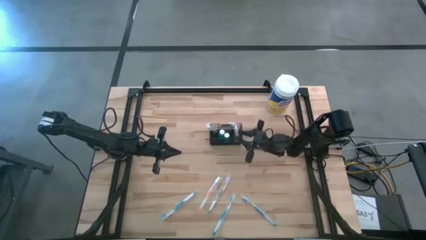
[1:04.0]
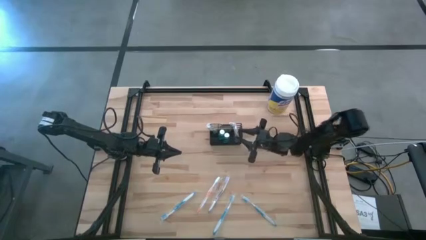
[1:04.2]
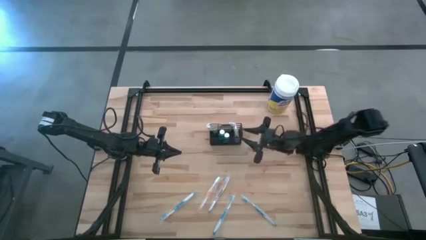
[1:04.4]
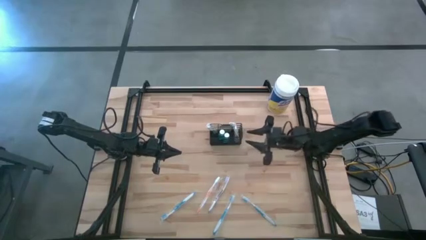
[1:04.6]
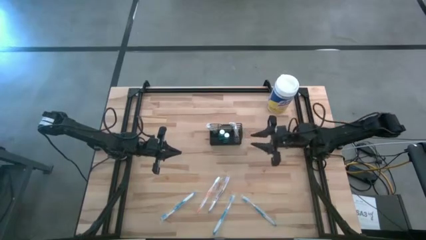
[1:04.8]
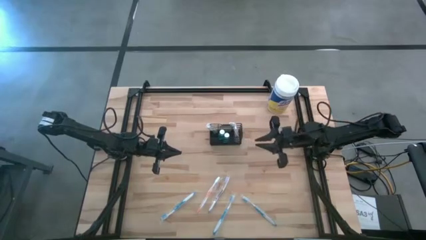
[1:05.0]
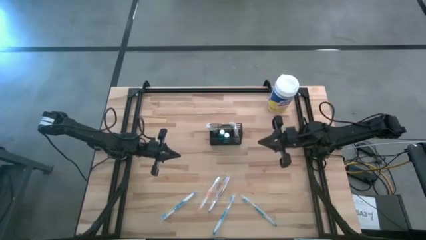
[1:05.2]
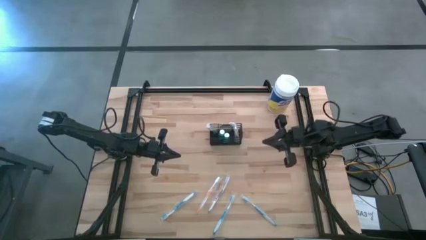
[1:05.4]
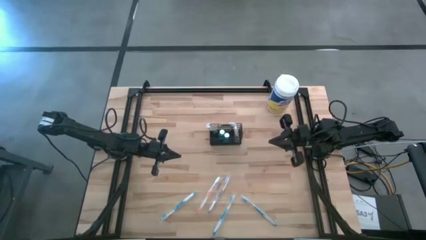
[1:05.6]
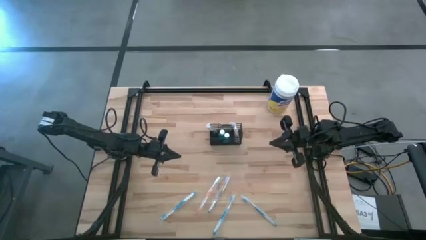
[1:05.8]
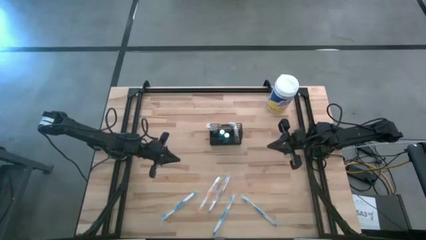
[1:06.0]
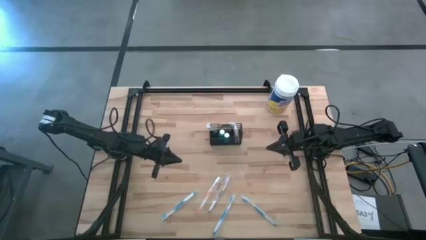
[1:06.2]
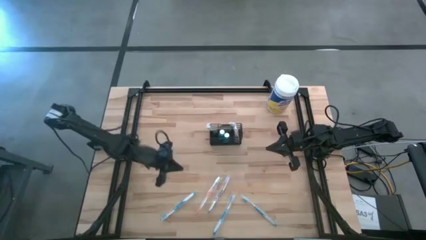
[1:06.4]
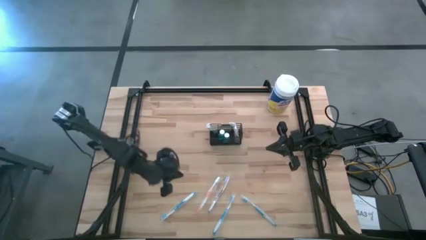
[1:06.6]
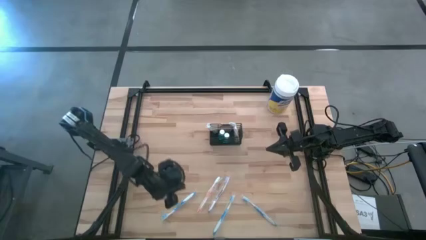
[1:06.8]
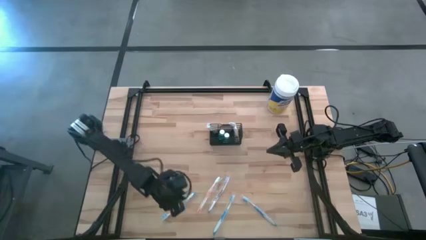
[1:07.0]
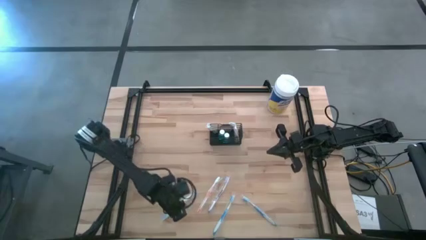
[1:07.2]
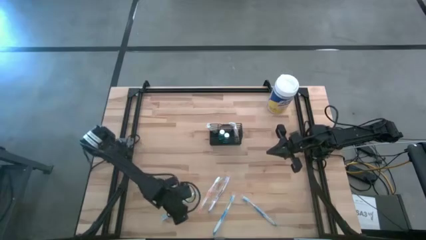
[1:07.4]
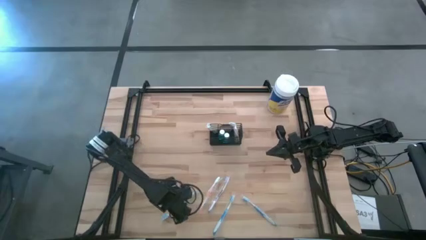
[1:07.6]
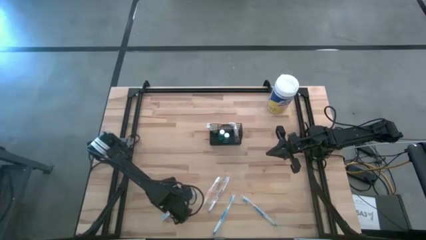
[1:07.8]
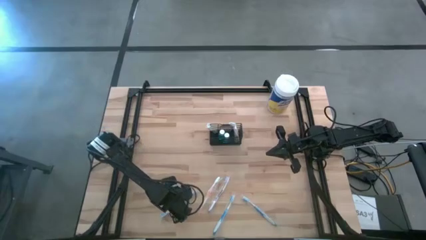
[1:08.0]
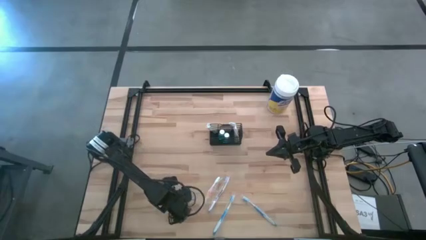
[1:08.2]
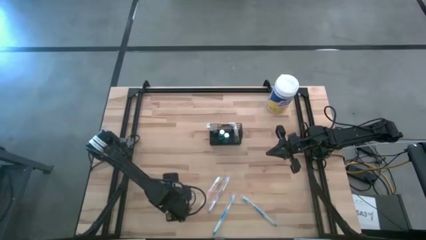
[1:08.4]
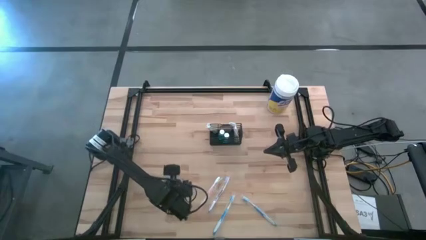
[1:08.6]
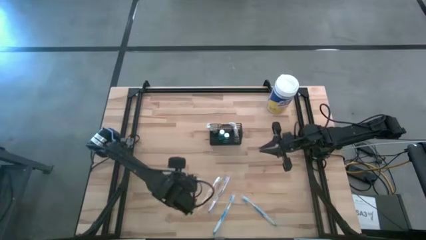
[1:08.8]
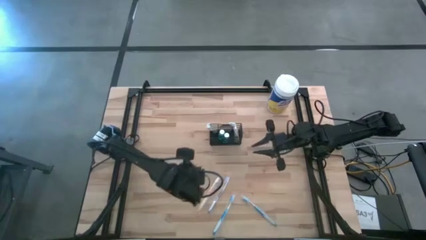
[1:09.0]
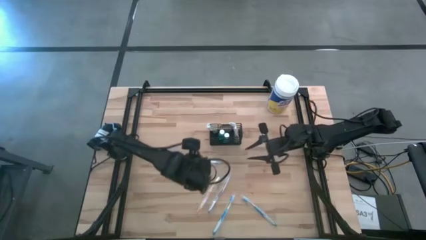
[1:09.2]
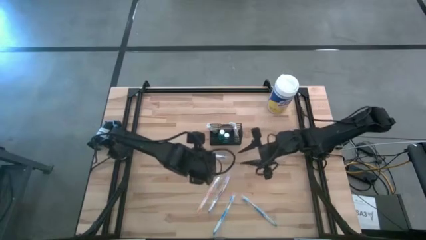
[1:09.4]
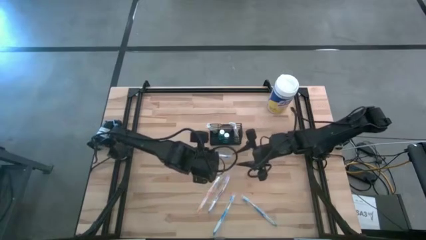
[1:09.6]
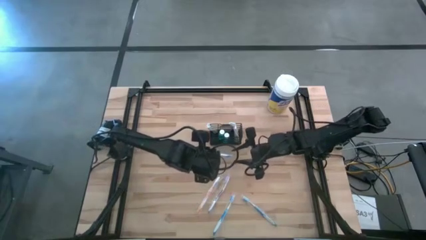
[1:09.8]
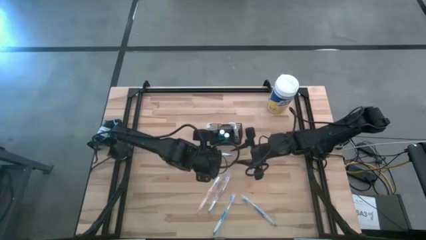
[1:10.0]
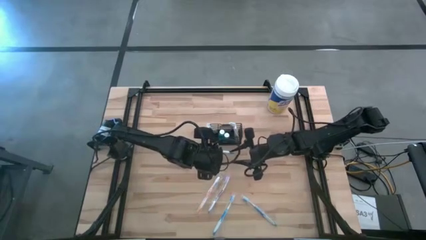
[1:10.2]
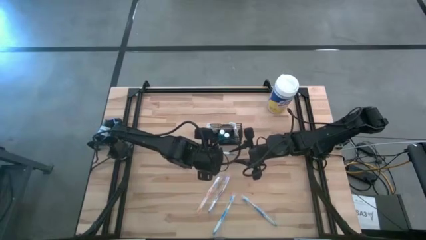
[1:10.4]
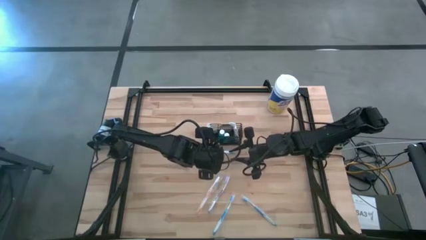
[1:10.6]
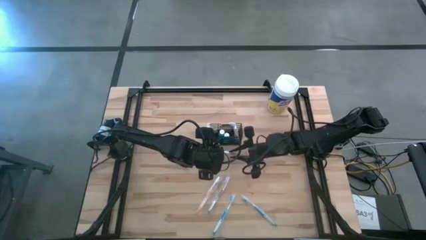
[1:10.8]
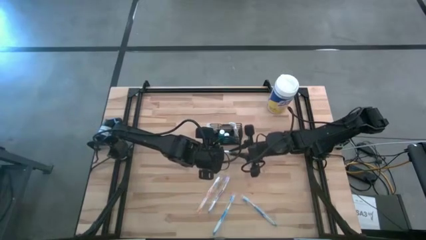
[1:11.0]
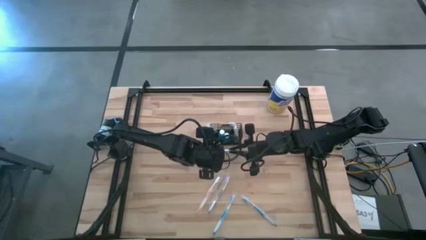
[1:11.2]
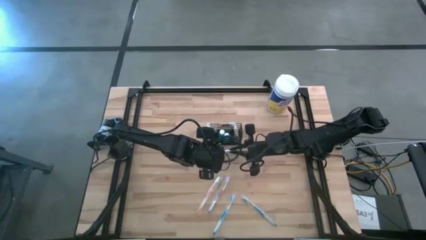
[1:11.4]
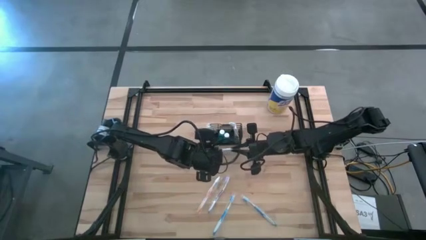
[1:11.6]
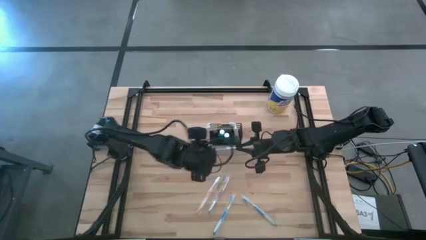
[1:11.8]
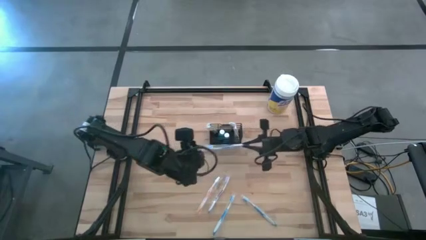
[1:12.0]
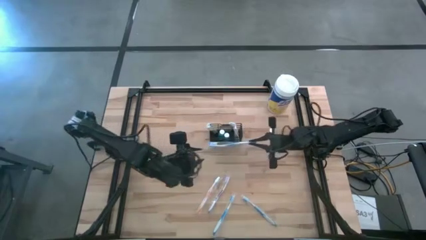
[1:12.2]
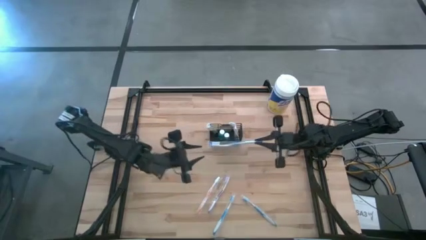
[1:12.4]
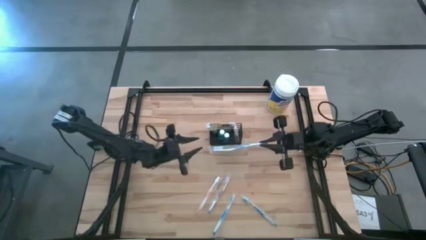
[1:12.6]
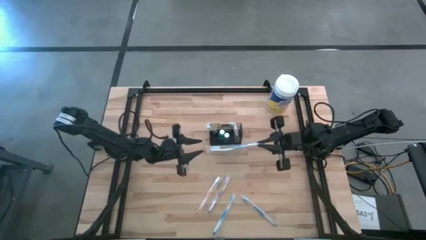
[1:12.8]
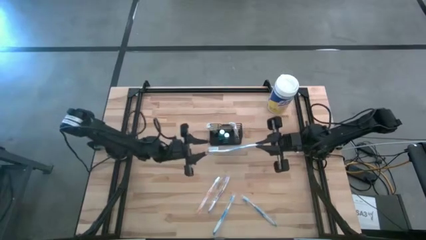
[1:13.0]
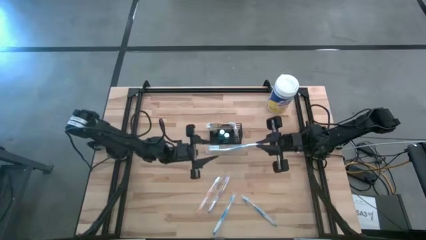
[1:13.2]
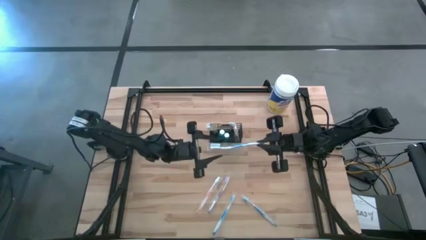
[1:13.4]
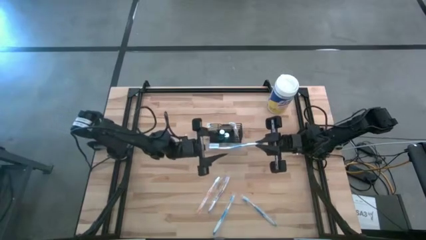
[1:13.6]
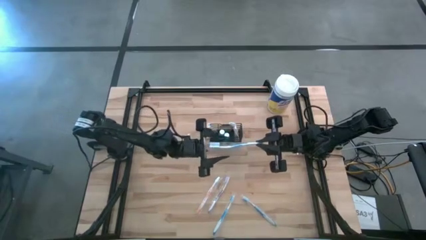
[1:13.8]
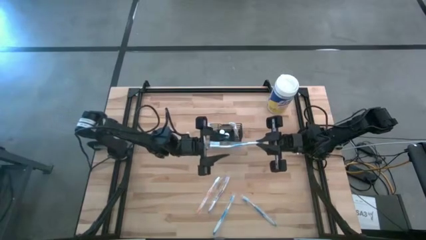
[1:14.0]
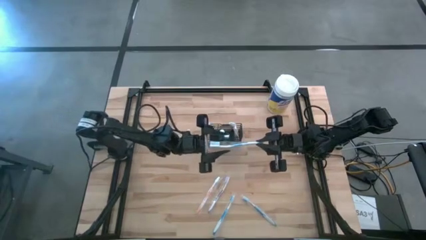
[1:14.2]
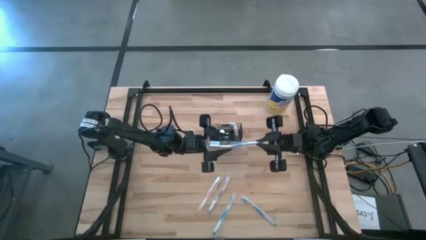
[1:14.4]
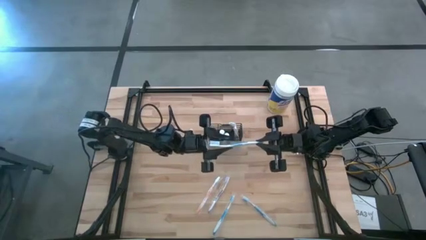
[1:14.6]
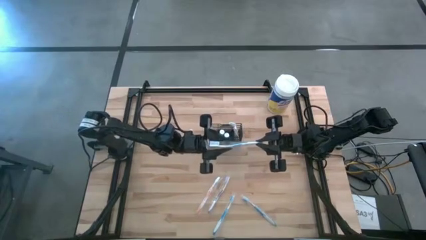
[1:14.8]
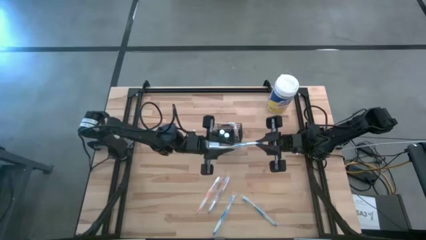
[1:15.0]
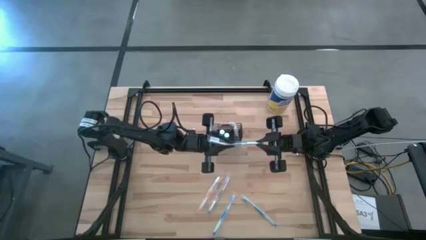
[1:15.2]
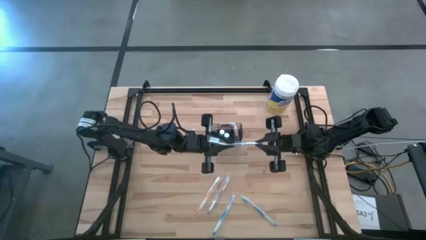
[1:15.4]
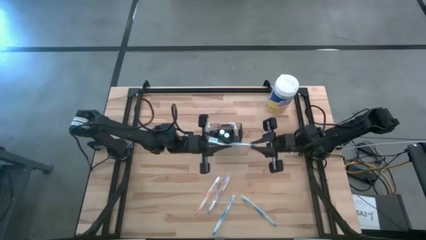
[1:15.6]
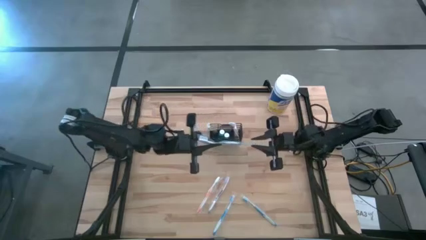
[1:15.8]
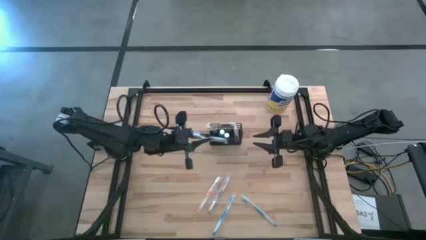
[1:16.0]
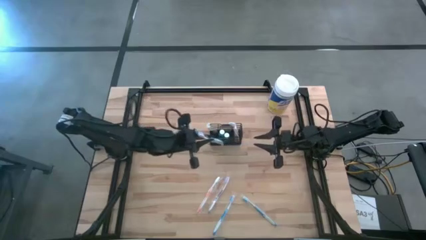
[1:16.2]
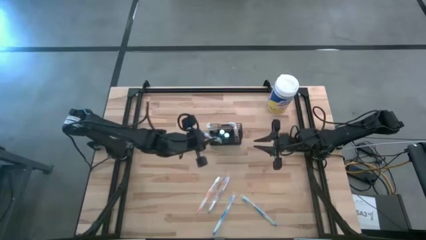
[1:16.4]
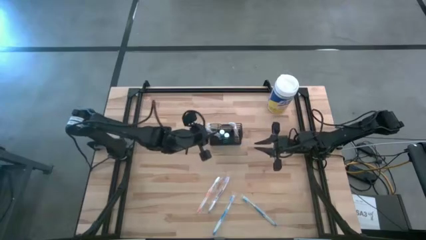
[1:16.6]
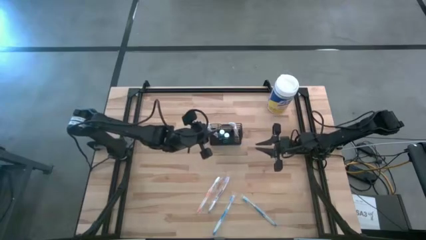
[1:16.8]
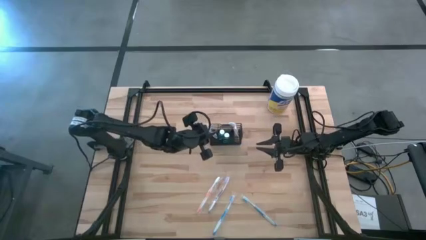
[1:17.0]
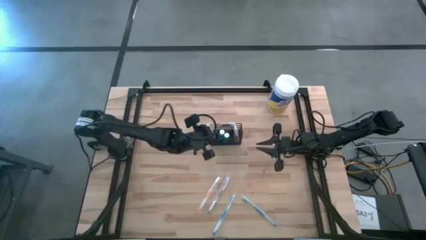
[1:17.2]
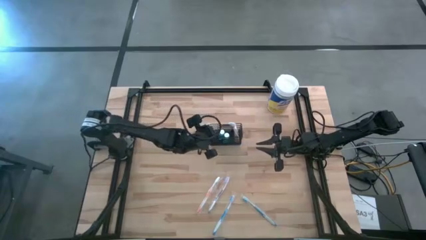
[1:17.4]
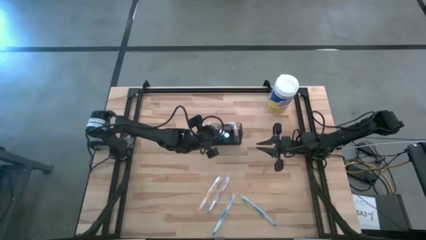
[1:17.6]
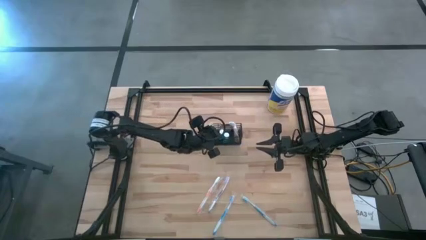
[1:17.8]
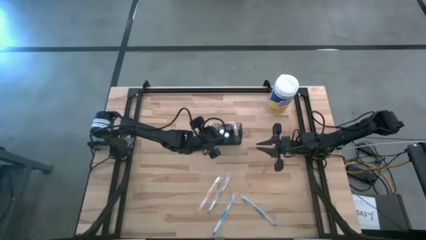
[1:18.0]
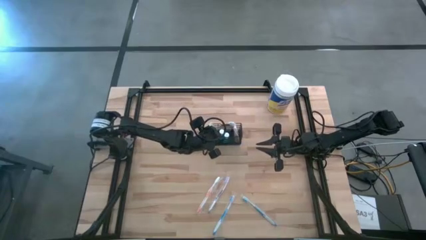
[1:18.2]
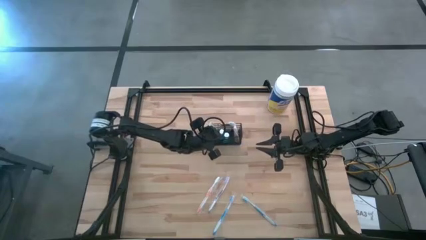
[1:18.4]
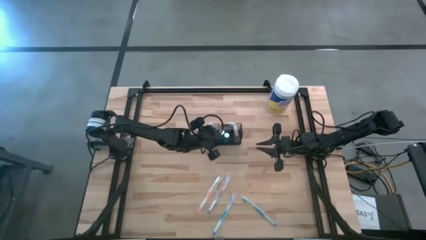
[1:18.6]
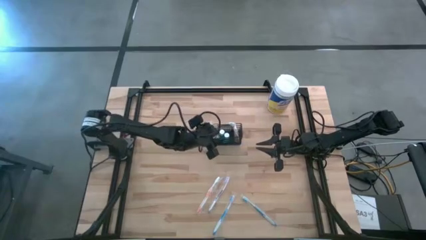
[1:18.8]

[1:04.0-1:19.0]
Task: Pick & Place toothbrushing station
Put the bottom left blue toothbrush into the black wire organizer
